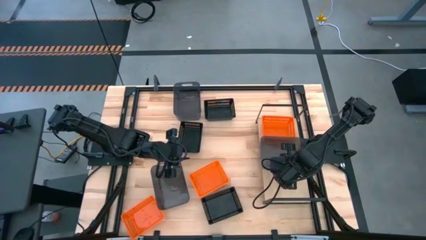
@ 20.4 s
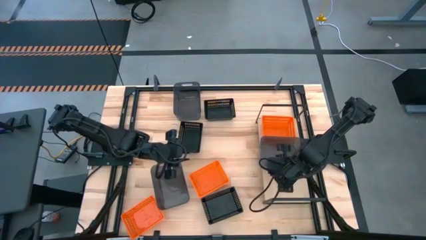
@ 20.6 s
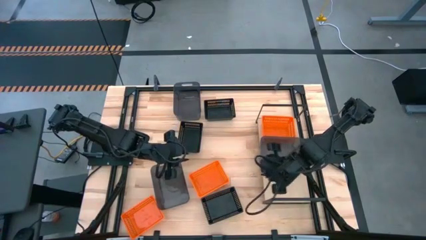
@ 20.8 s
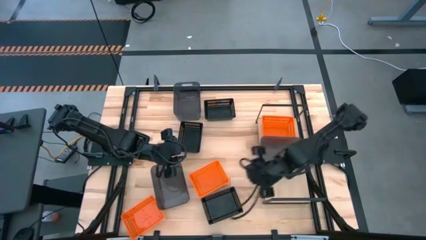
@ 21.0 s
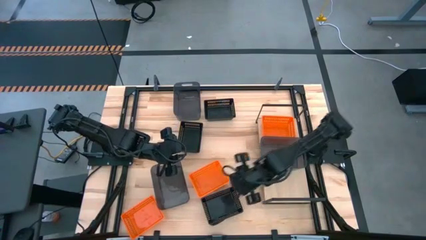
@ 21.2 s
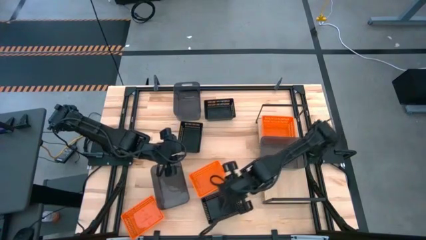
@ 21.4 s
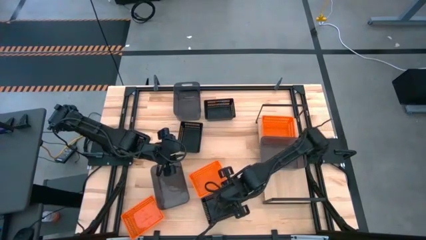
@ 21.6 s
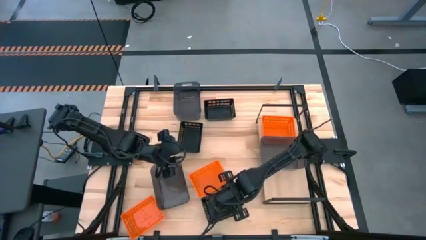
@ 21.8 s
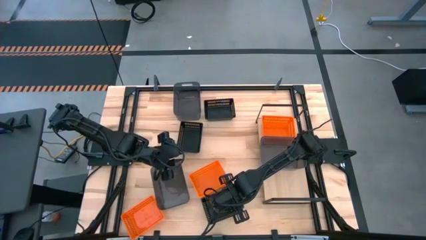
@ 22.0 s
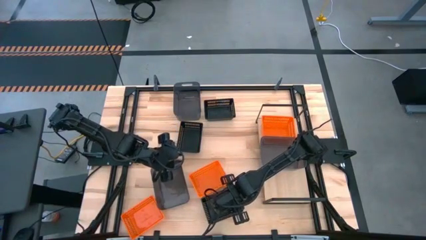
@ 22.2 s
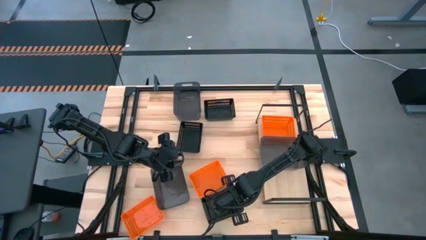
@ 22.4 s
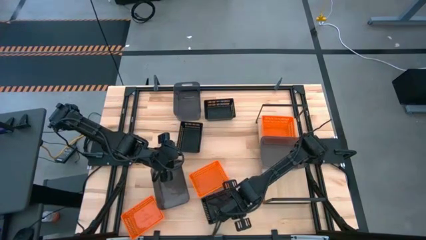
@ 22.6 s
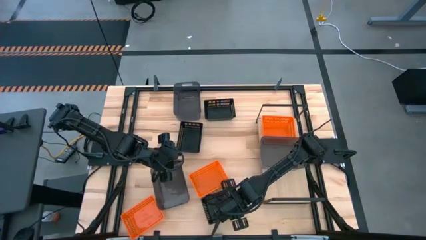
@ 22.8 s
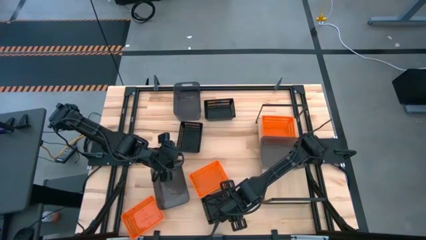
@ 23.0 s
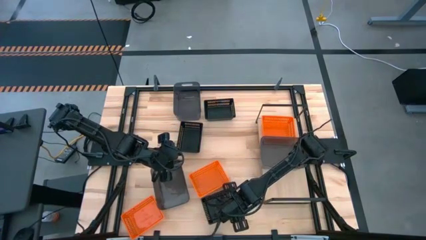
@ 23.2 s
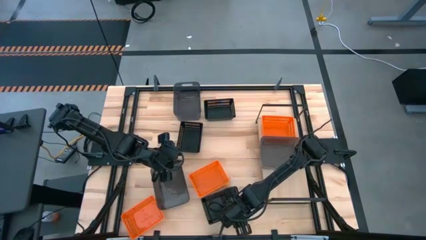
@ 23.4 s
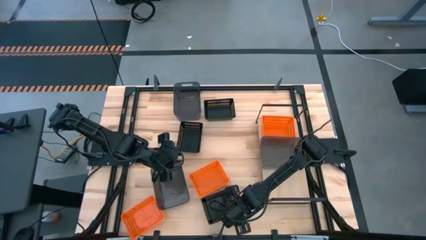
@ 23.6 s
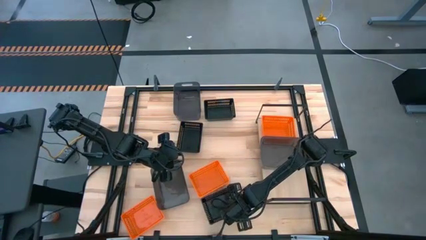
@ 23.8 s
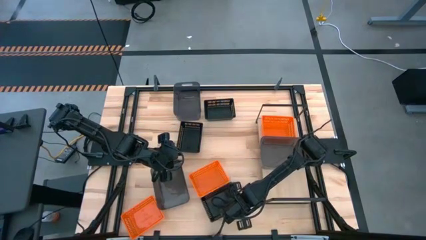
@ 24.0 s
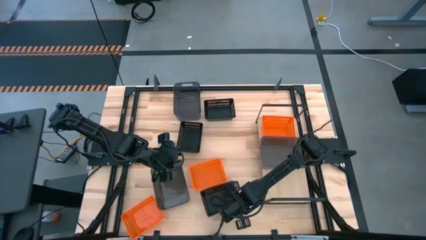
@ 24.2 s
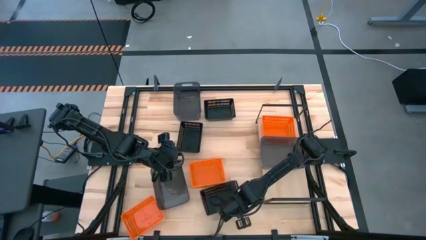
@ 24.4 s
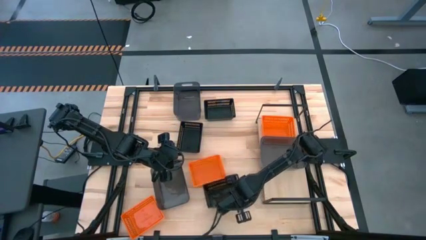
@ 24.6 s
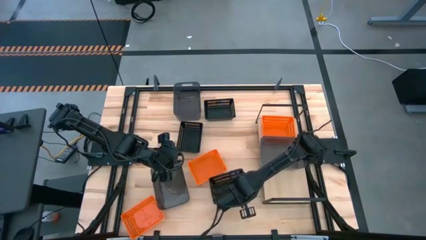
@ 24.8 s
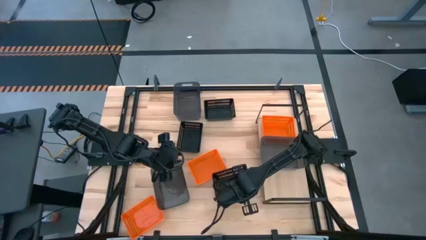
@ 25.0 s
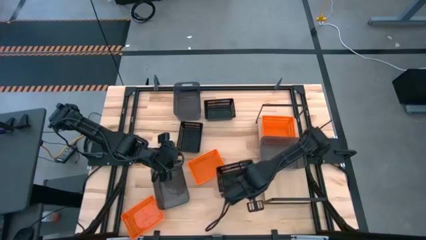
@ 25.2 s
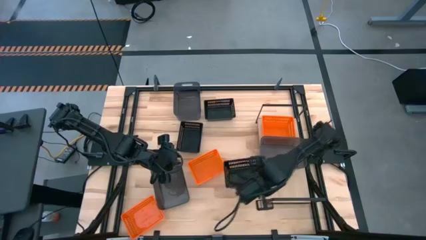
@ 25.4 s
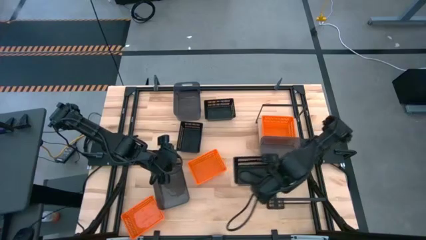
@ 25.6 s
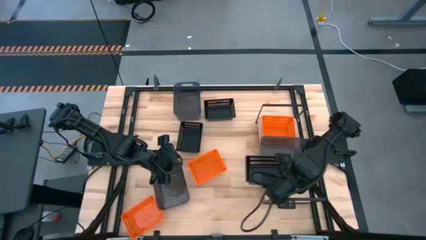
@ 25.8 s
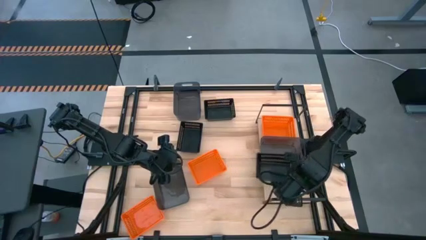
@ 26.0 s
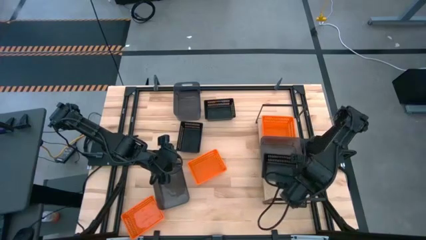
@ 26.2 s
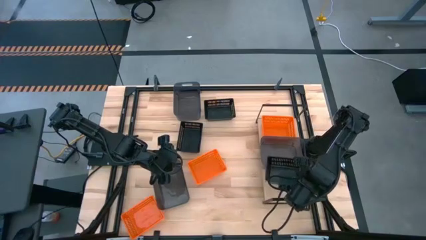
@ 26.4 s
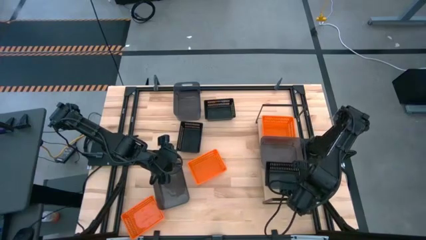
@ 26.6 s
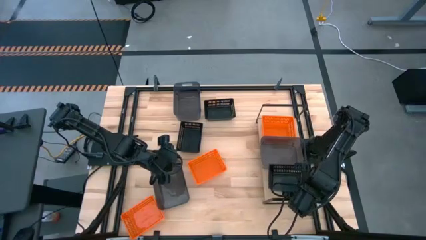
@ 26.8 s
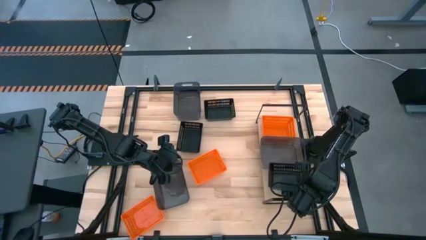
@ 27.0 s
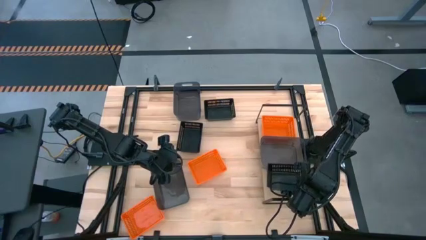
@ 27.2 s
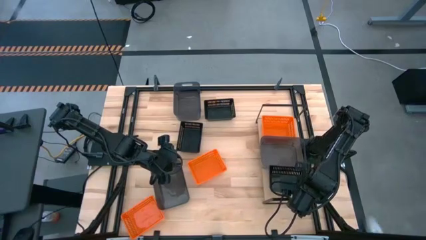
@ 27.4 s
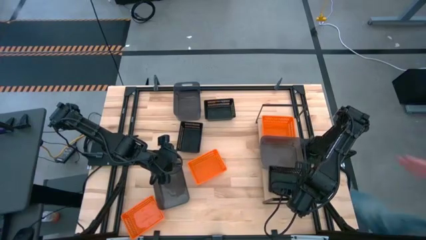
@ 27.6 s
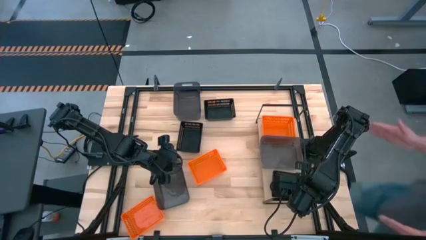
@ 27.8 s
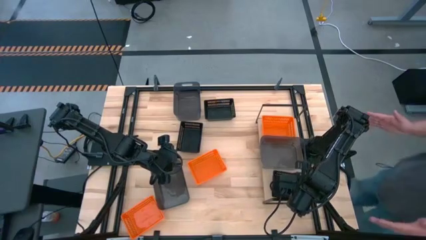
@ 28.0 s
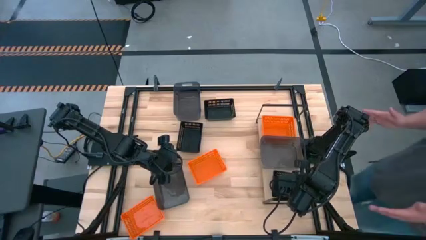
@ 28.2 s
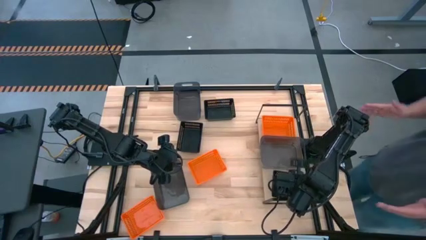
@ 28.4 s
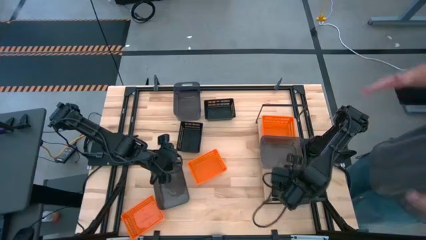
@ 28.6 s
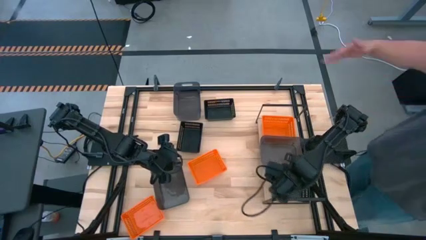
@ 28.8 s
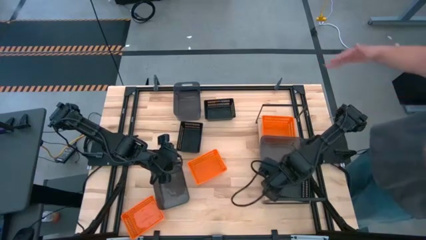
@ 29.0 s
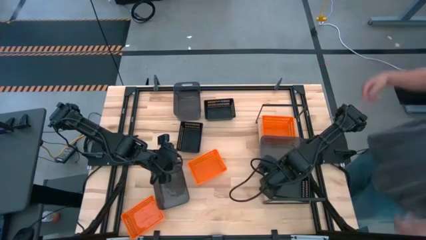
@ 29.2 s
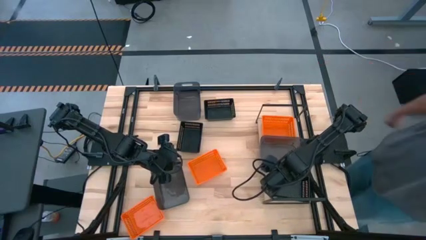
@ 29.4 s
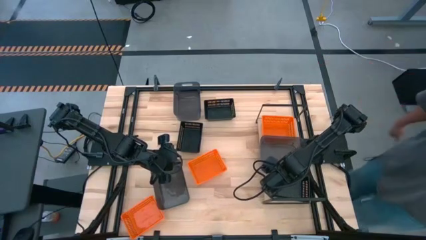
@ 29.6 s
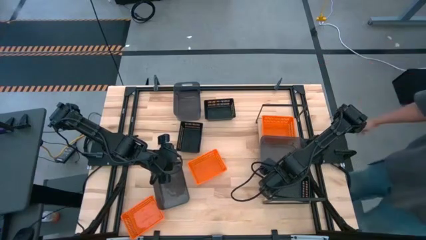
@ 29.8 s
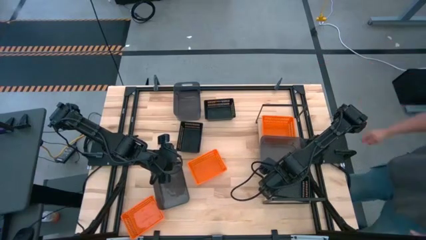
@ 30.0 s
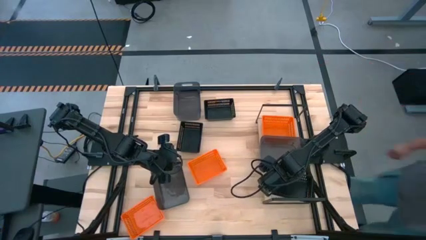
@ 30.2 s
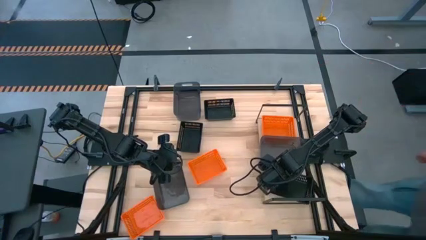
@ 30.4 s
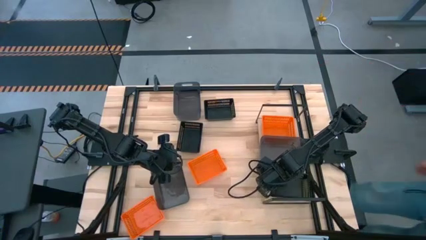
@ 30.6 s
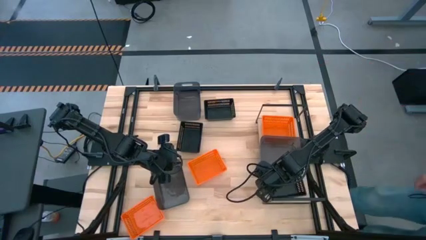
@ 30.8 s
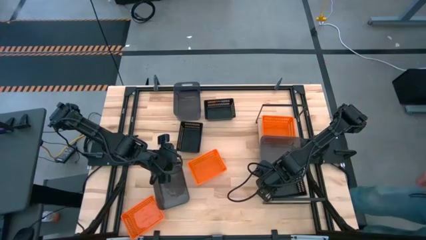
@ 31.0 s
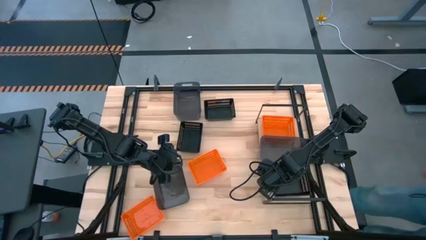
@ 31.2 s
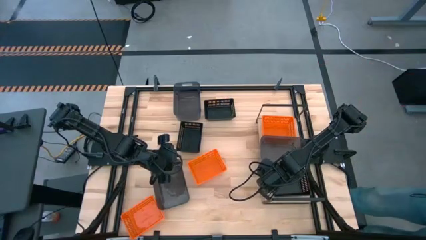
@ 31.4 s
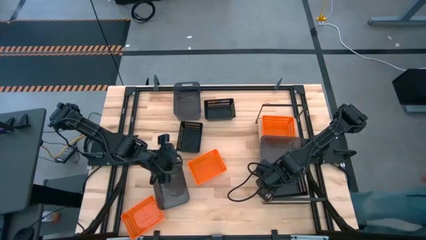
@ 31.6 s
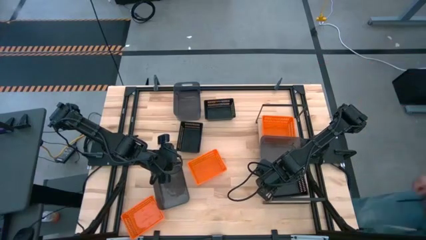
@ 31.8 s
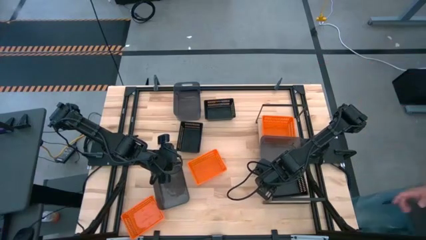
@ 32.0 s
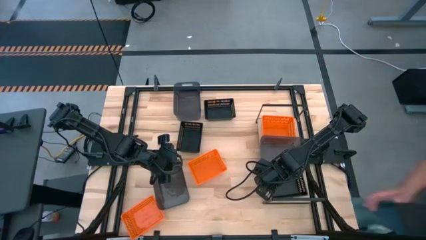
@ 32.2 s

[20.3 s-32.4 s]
Task: Stack baskets on shelf by color
Put bottom black bin on the shelf
